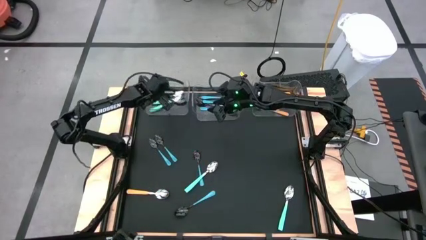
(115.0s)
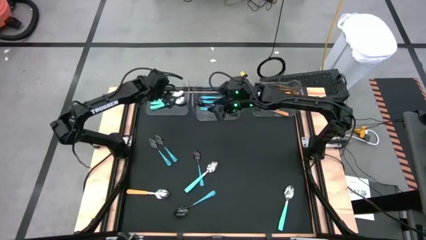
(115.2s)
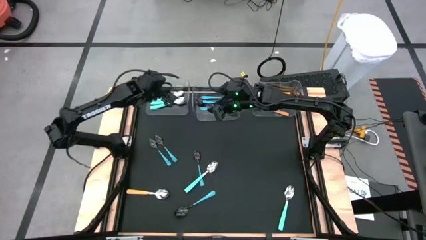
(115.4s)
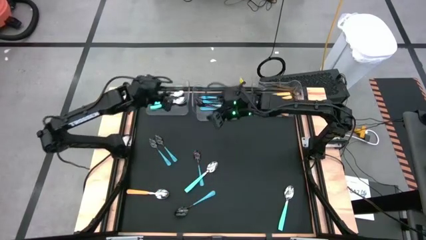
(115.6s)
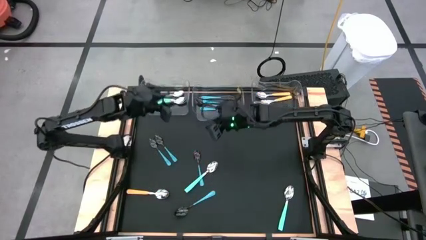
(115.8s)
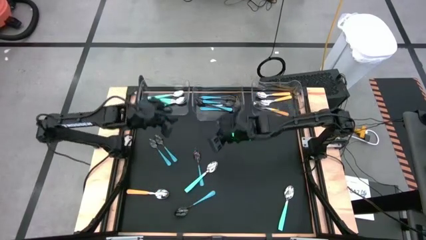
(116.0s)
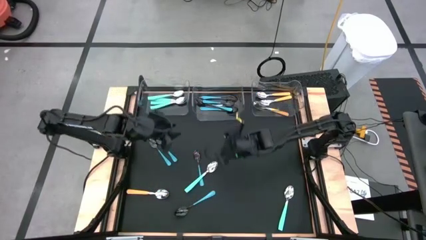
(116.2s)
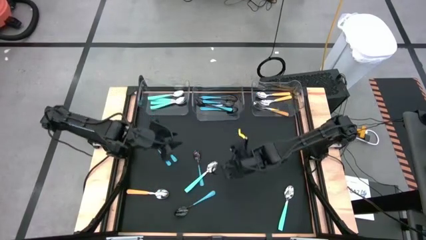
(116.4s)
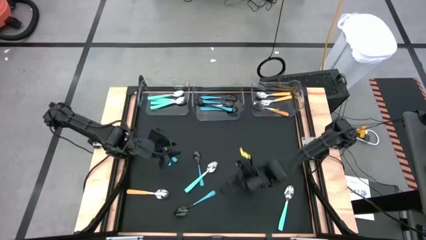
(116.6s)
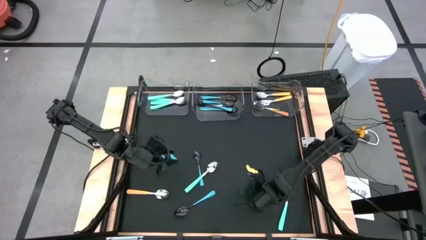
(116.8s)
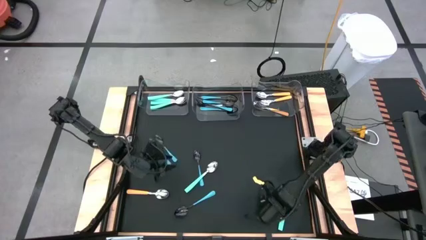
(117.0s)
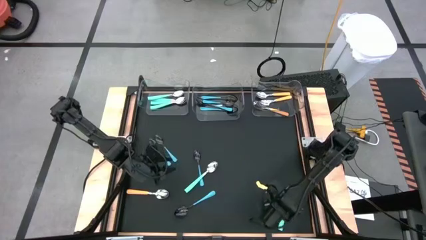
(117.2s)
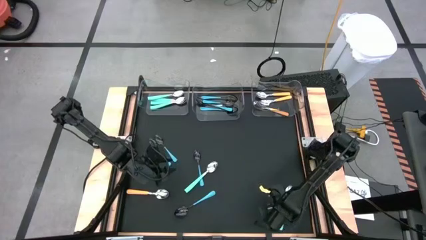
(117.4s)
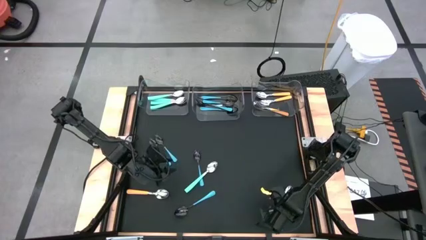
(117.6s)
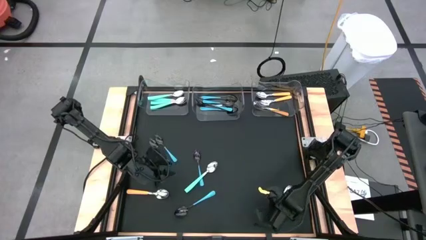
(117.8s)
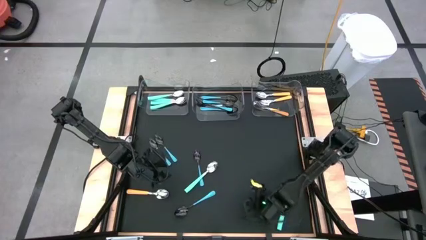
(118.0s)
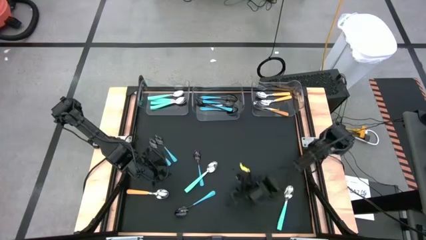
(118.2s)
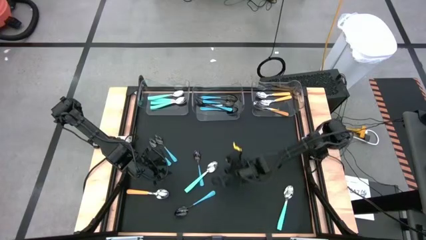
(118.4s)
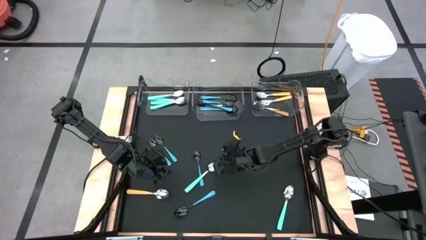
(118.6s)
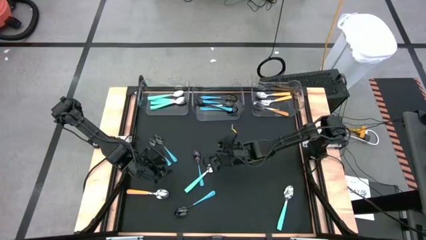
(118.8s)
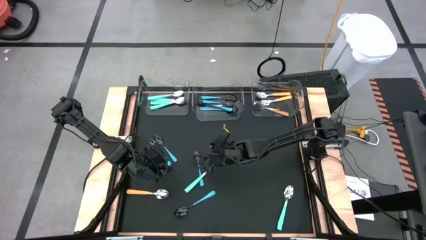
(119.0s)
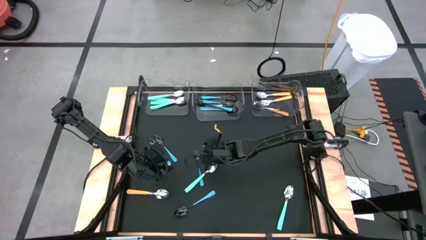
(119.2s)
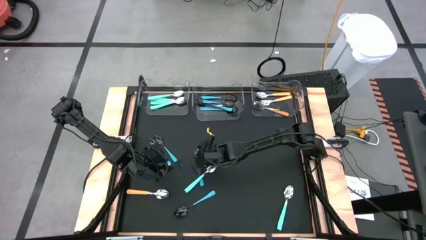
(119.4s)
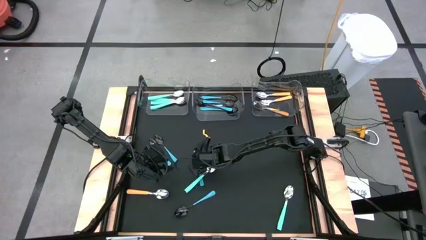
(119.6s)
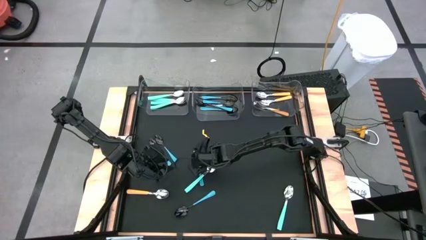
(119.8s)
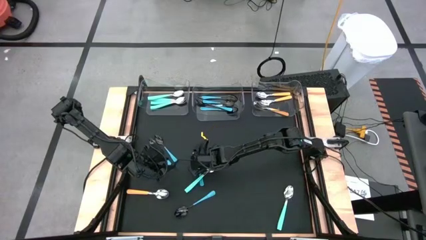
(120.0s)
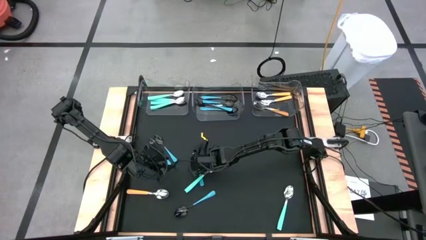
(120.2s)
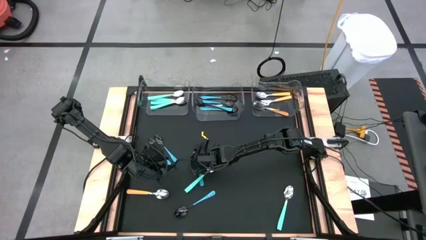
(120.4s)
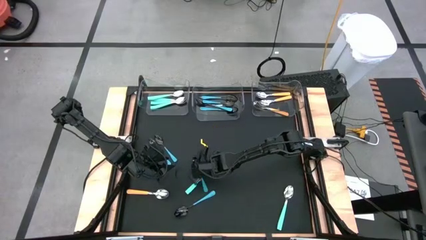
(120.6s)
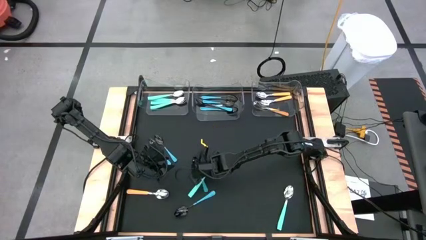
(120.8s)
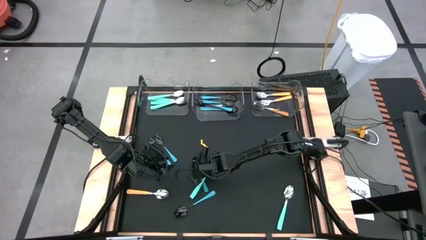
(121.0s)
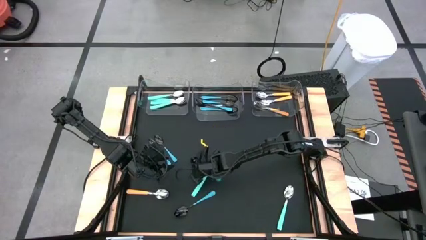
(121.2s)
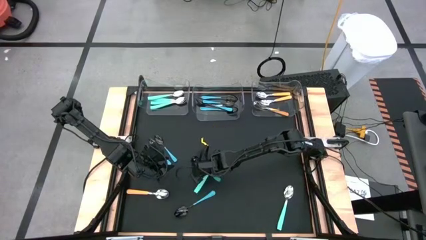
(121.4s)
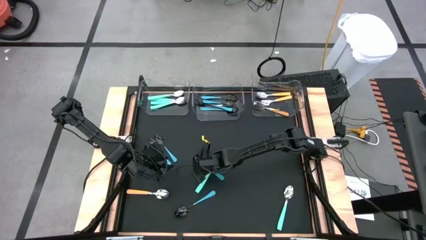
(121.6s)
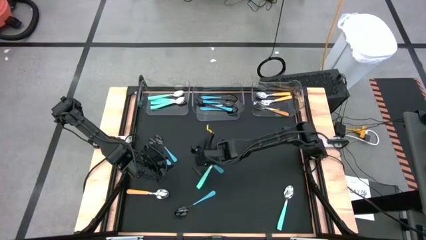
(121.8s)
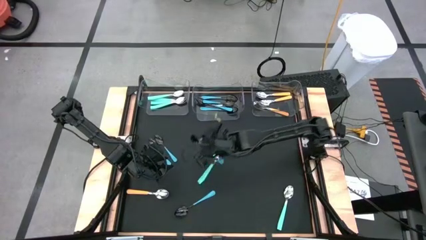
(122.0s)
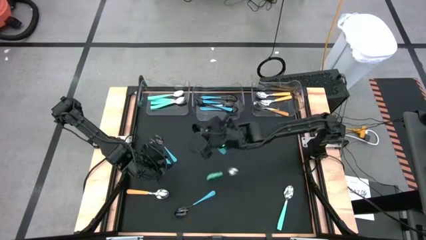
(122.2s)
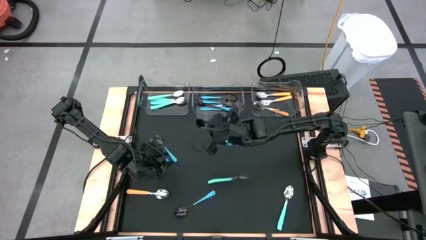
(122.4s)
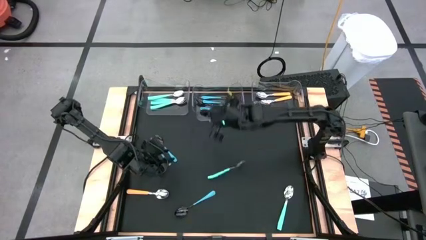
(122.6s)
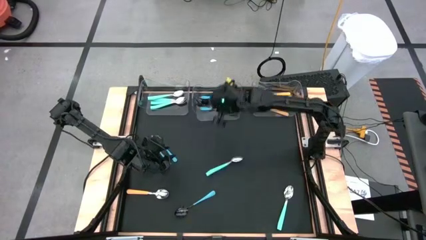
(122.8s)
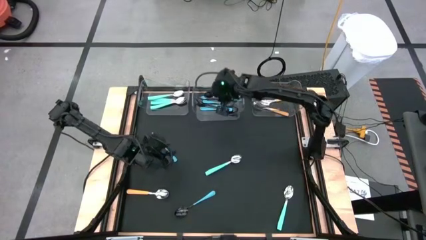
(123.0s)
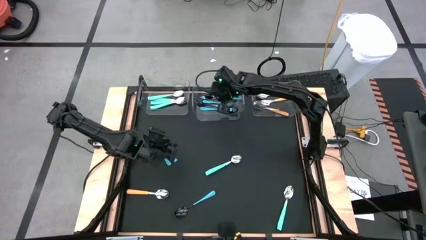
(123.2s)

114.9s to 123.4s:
Task: Sort silverware by color (type)
Put the blue spoon into the middle transparent bin

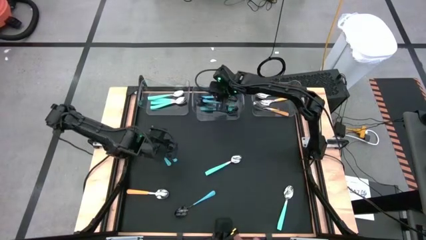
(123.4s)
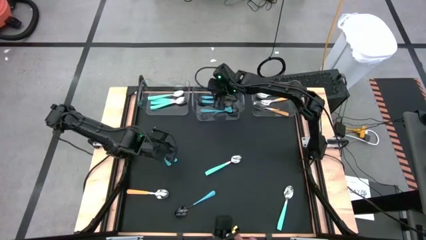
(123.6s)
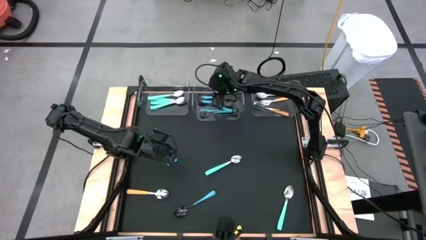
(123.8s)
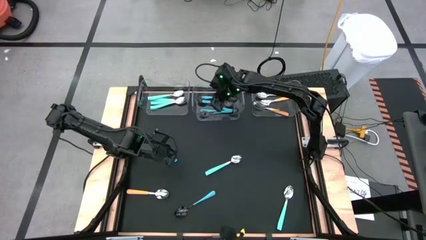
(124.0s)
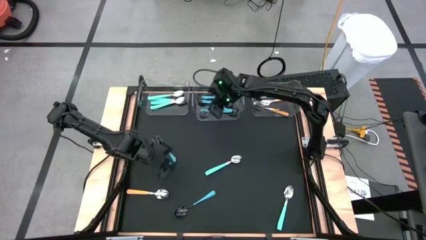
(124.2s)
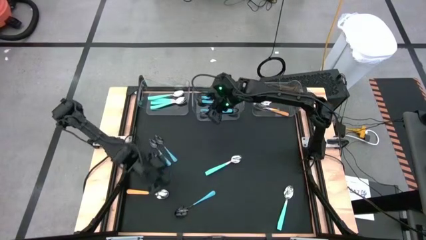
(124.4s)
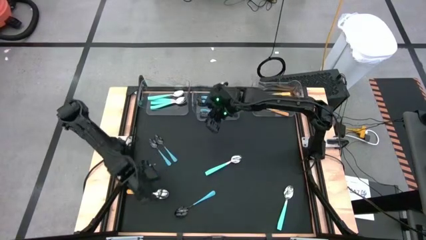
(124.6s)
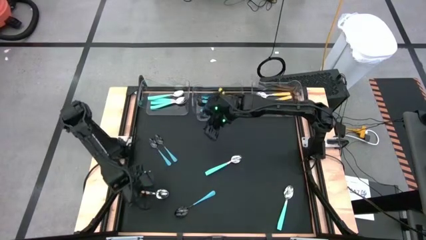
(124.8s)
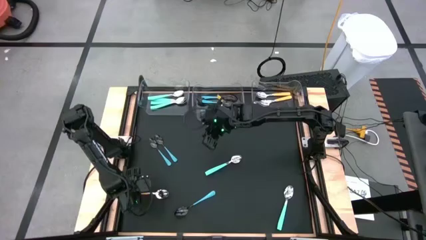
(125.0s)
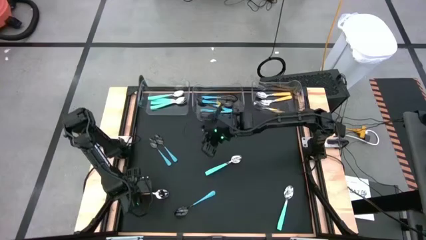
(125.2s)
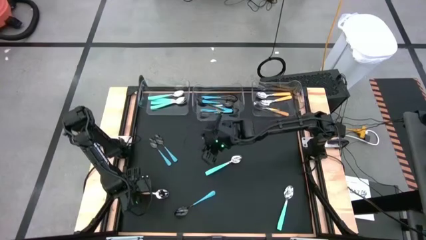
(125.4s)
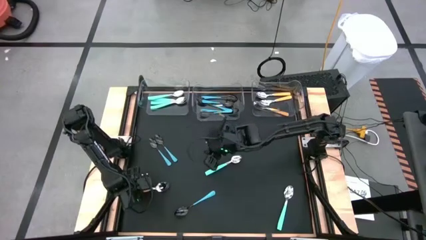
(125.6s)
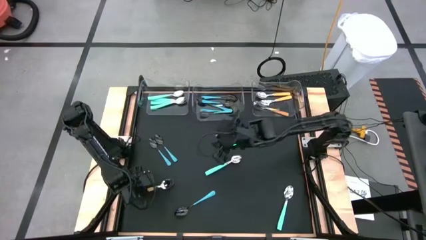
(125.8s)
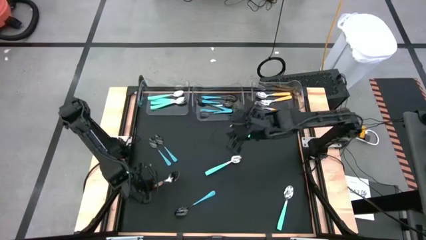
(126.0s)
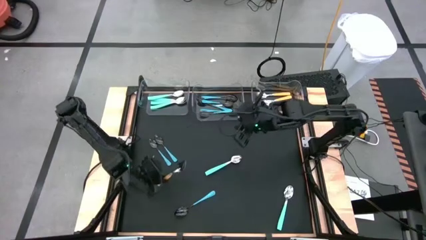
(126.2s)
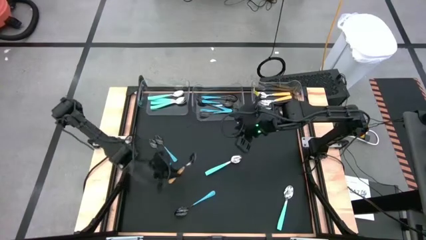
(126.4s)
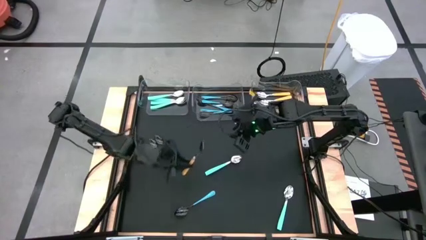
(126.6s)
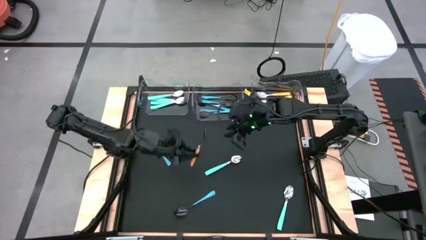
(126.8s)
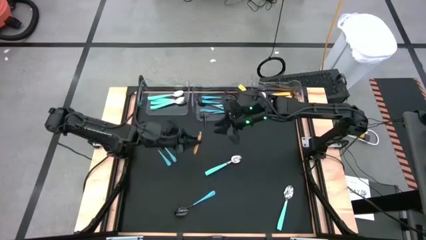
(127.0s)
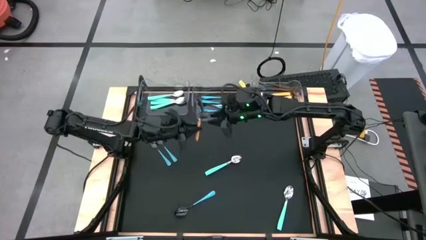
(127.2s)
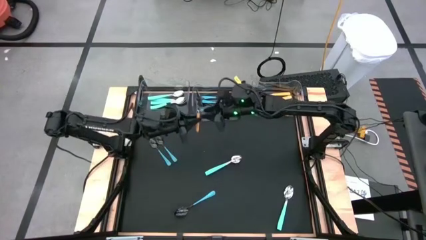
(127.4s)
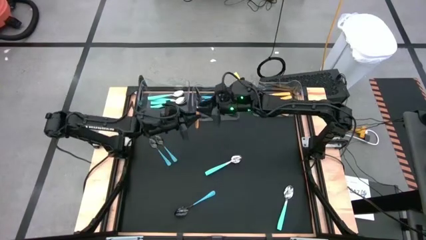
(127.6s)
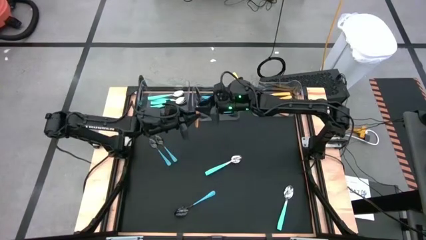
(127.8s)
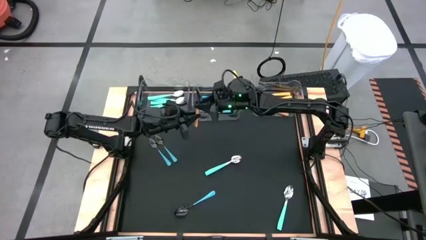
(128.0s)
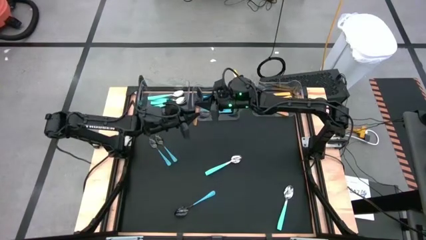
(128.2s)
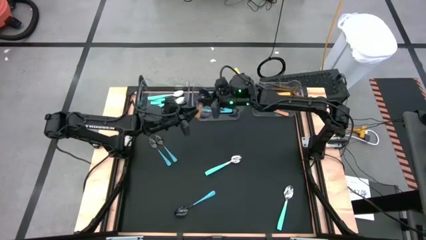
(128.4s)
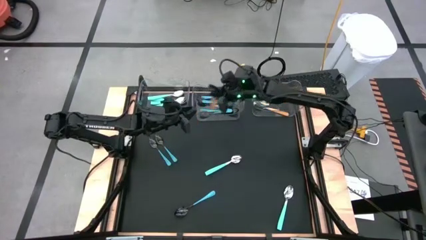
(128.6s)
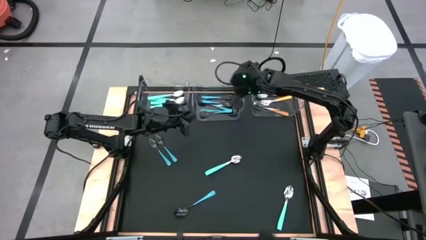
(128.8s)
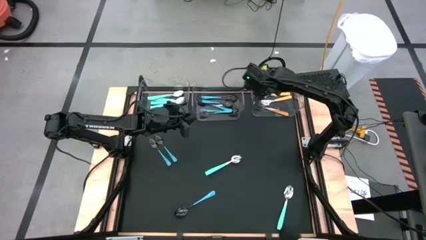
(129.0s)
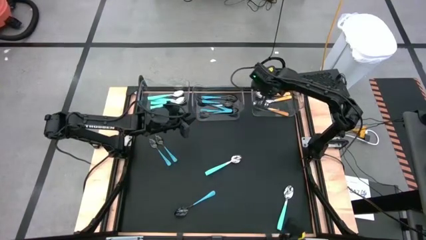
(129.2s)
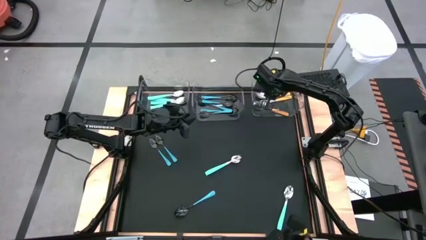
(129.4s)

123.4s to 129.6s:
Put the orange spoon into the right bin
